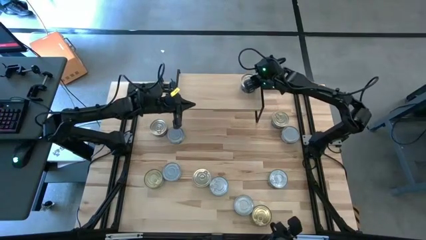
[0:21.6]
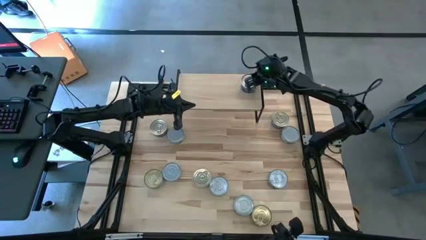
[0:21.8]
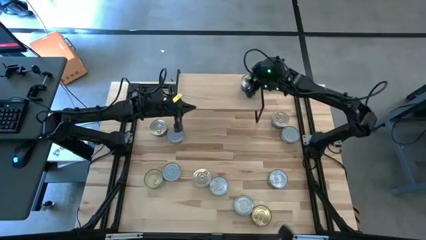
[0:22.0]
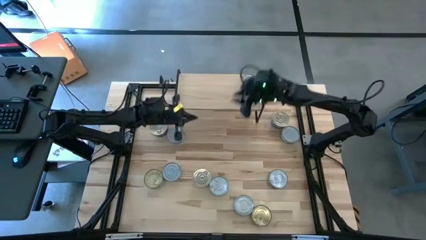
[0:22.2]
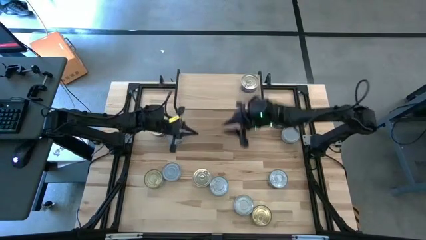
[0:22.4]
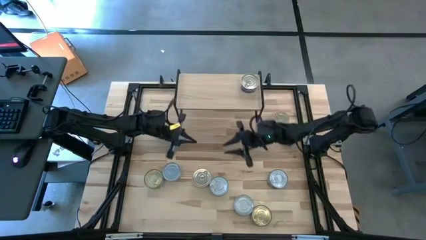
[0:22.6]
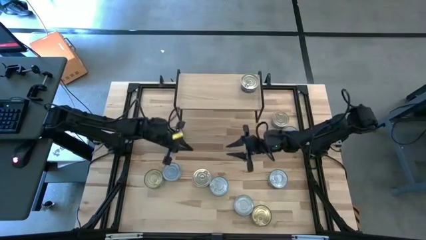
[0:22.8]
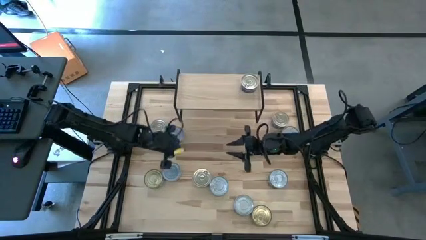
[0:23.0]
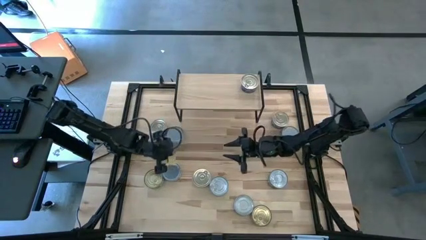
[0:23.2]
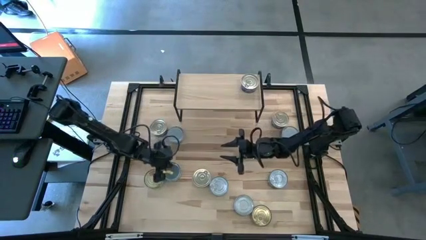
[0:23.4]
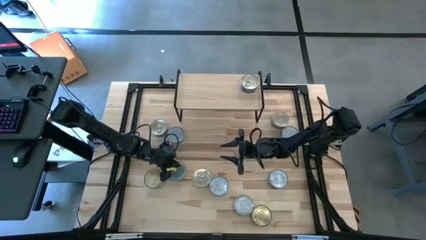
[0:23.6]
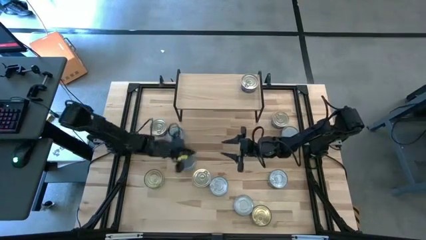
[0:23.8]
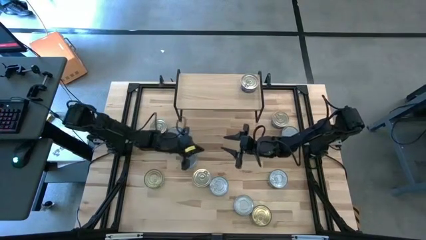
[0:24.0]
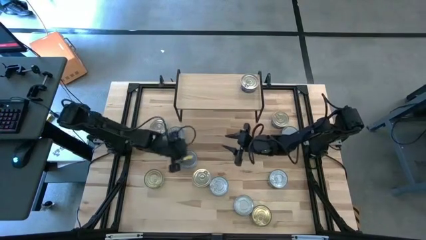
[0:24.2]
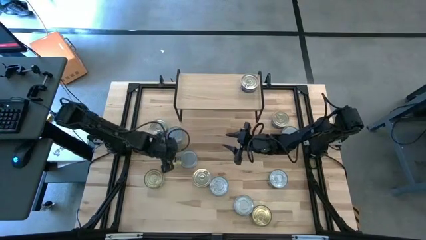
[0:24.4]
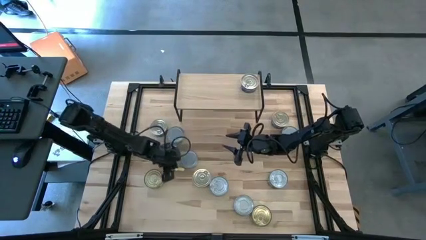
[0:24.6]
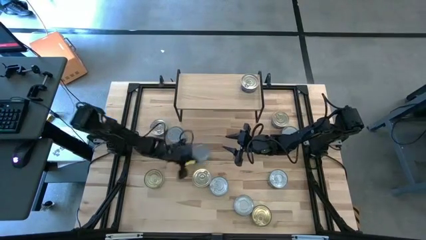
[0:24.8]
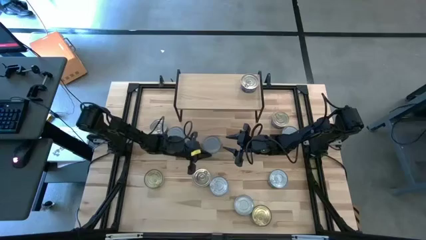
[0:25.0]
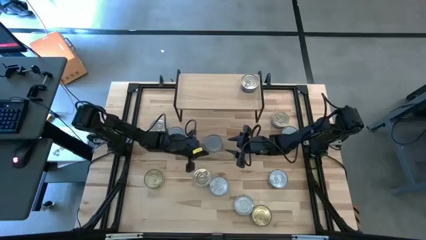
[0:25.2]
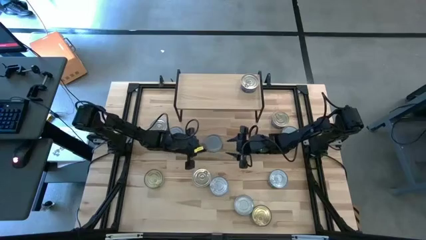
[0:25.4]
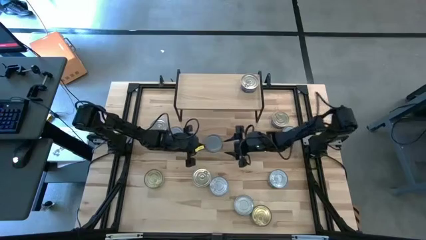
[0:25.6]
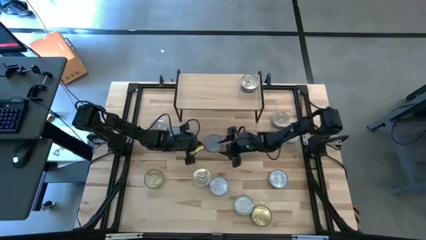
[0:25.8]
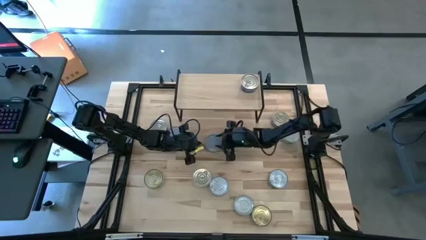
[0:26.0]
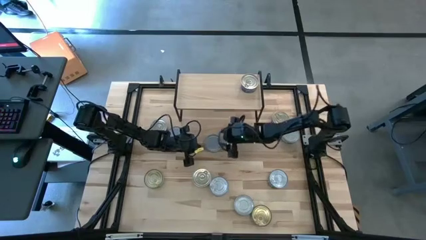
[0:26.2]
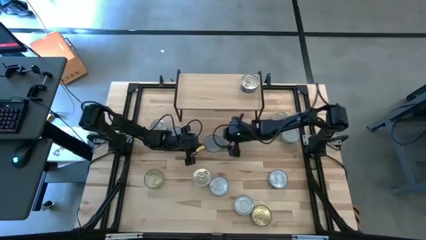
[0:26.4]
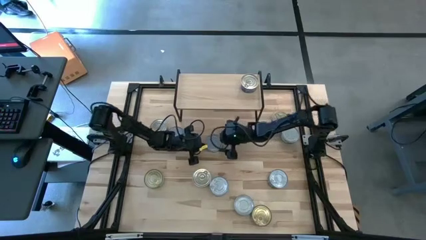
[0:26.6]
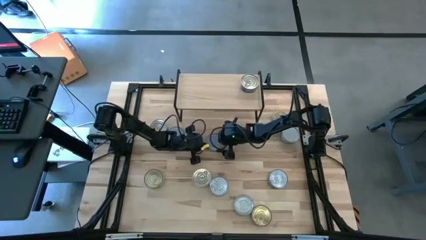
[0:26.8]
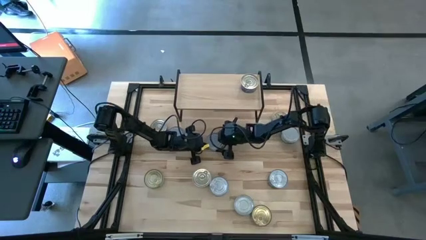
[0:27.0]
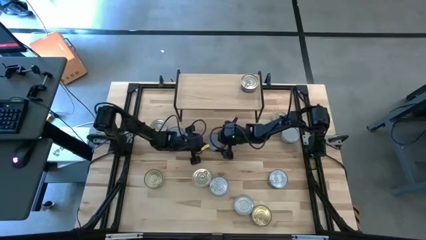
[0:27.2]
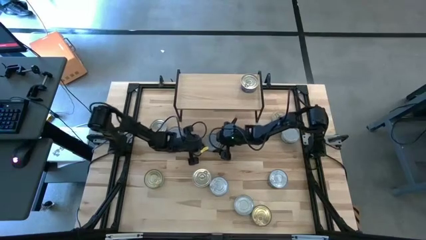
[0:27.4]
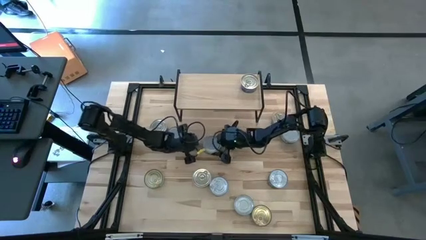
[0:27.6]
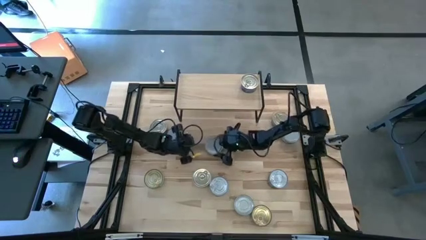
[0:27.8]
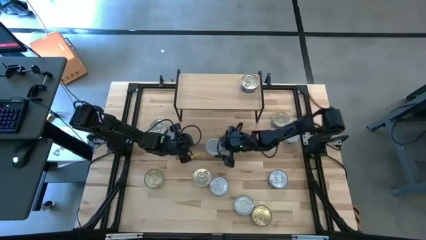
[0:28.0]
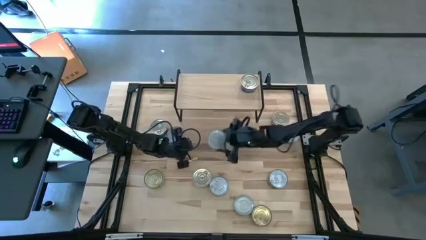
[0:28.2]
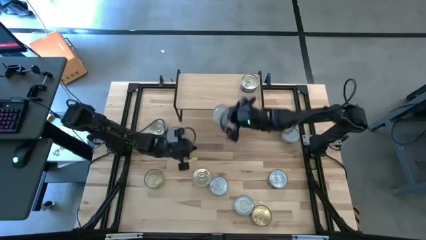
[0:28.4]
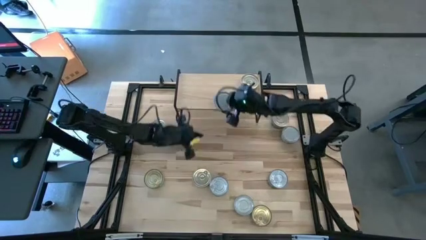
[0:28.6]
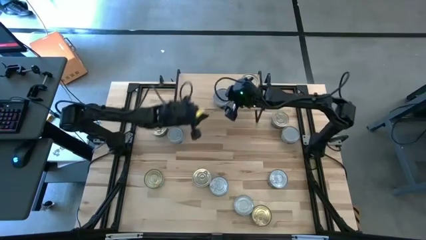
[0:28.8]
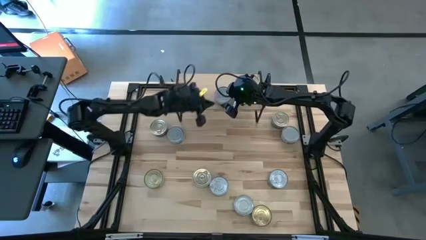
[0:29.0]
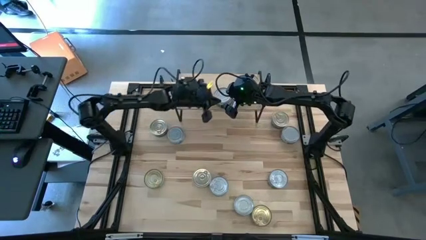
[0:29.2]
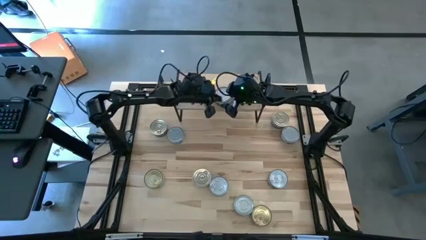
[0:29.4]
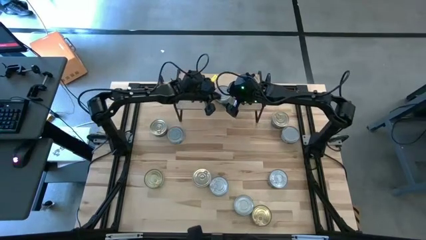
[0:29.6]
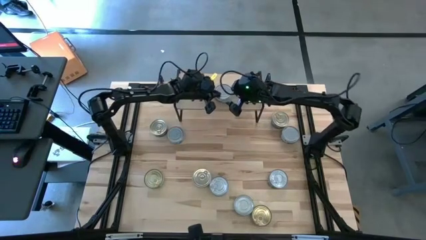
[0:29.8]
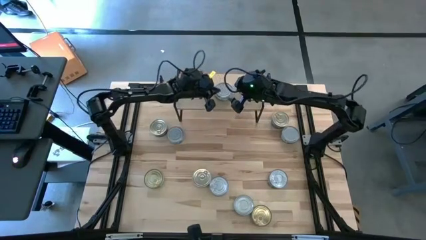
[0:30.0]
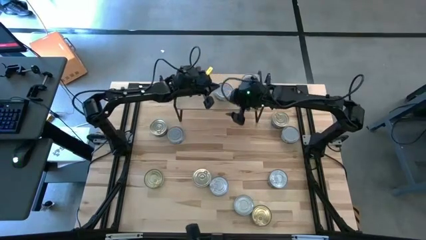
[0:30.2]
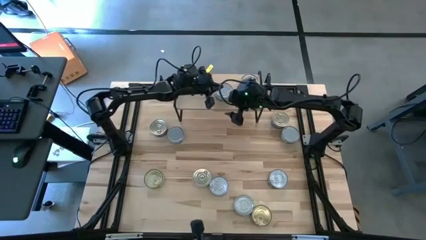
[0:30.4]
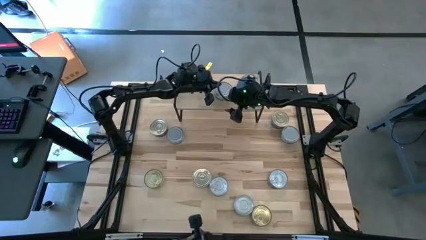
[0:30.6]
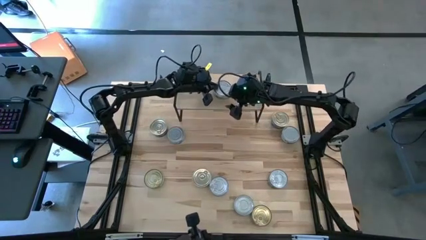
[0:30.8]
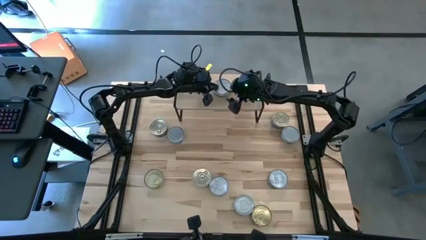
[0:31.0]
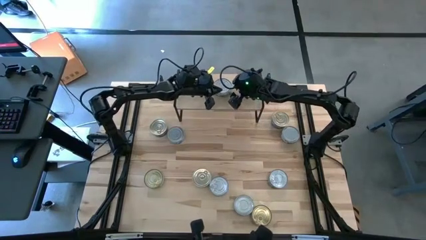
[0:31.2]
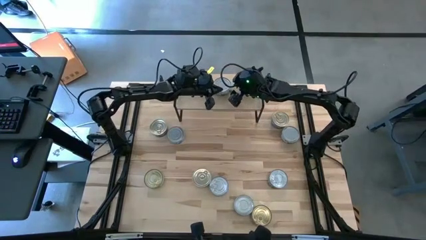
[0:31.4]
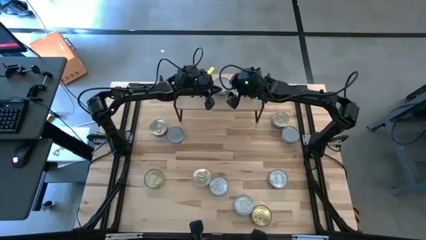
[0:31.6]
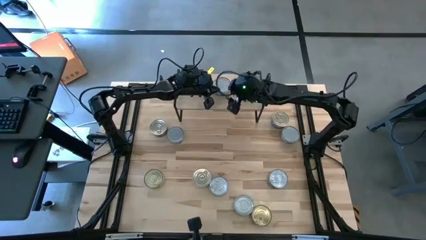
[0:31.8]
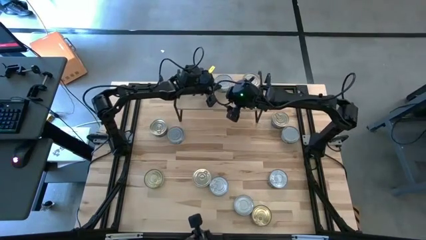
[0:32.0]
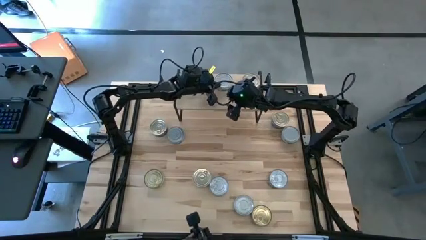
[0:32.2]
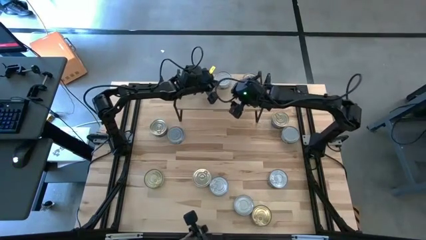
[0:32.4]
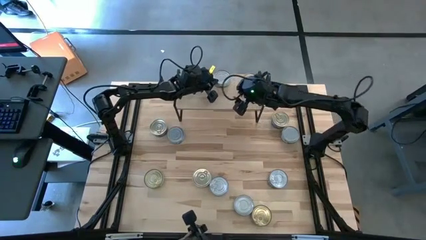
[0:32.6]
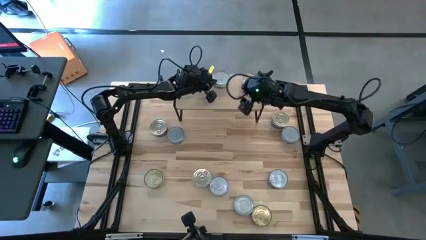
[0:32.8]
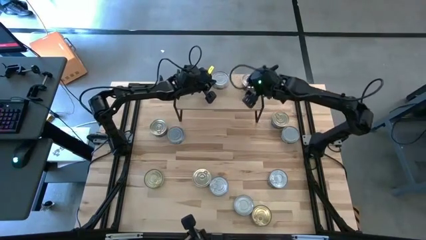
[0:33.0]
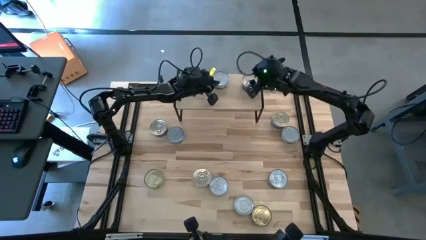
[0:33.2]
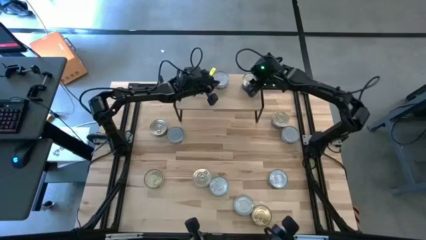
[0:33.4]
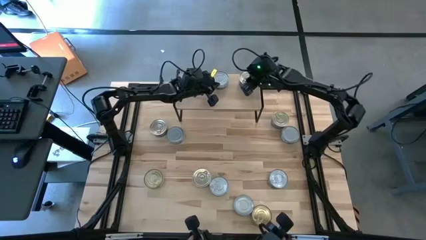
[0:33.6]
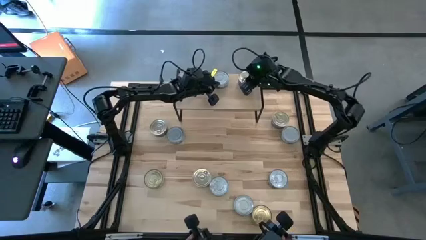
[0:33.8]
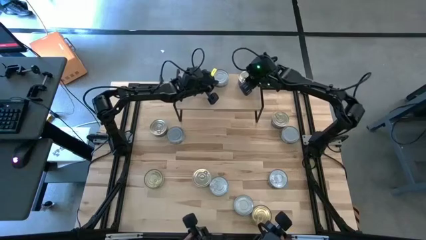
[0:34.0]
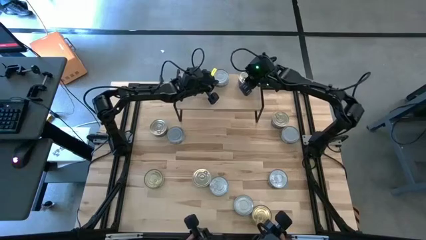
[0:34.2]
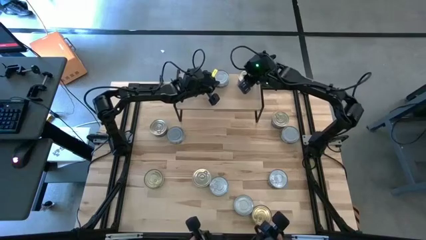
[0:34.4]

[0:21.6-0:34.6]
Task: Stack canned seafood by type on shelf
Put the bottom left light green tuna can on the shelf
